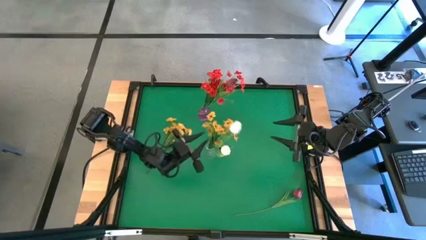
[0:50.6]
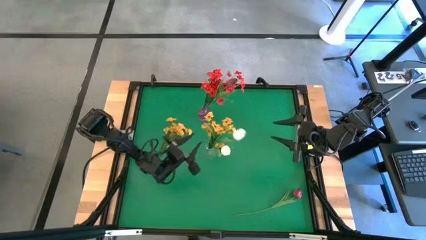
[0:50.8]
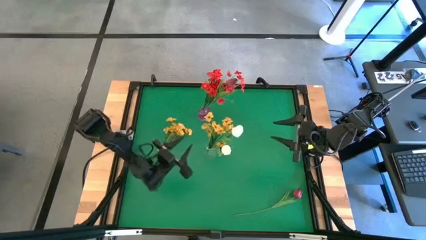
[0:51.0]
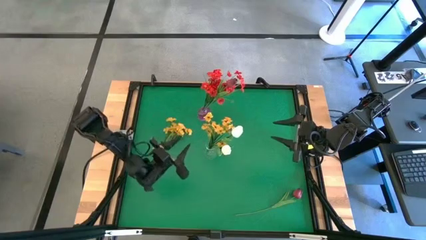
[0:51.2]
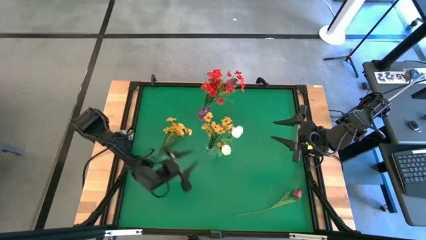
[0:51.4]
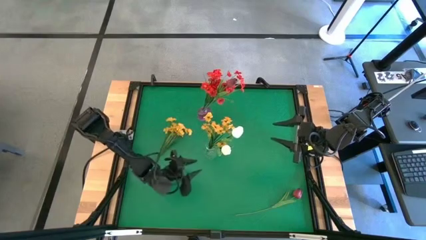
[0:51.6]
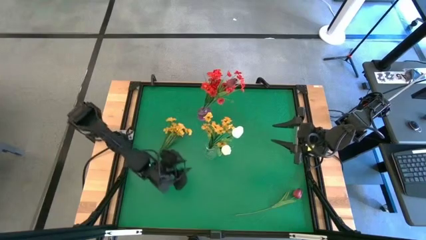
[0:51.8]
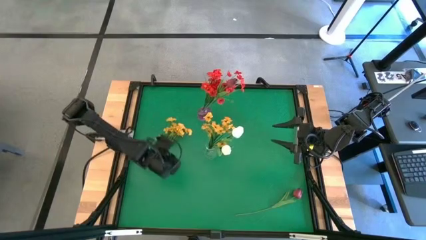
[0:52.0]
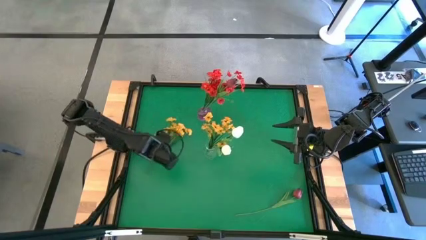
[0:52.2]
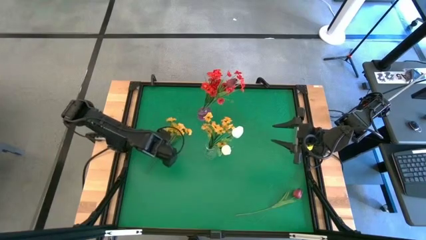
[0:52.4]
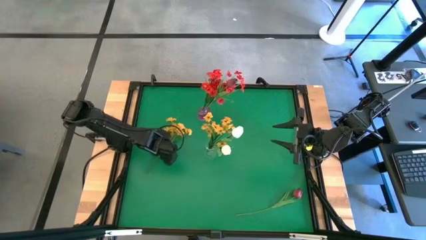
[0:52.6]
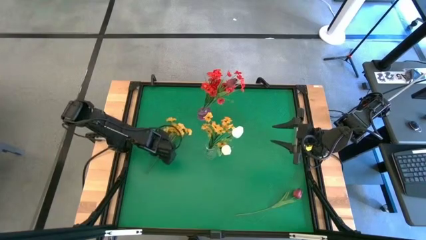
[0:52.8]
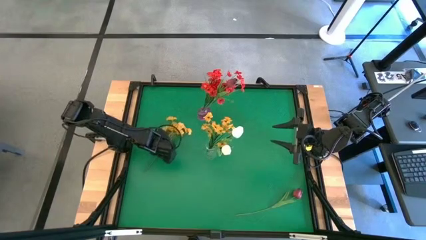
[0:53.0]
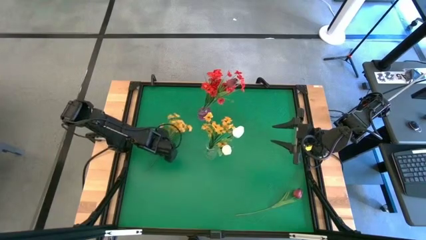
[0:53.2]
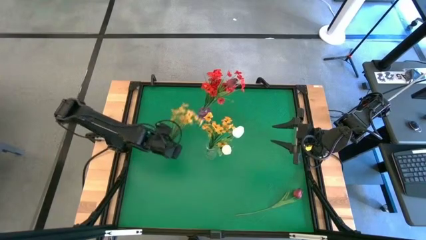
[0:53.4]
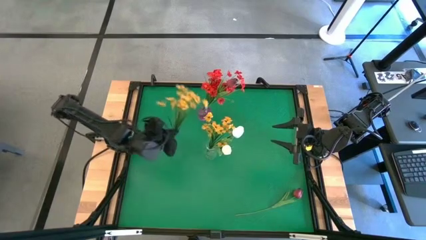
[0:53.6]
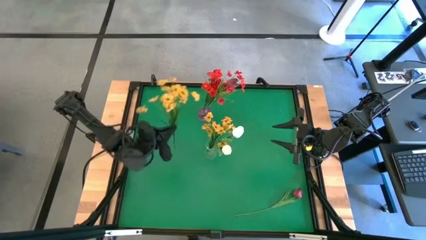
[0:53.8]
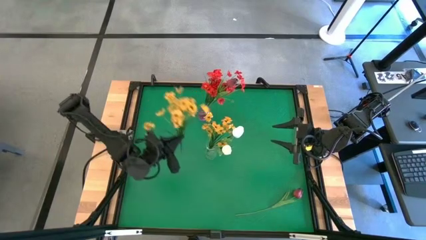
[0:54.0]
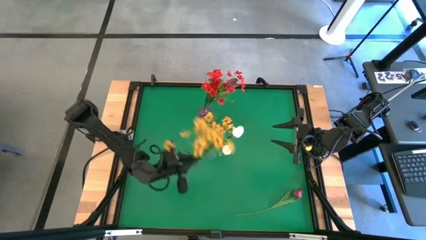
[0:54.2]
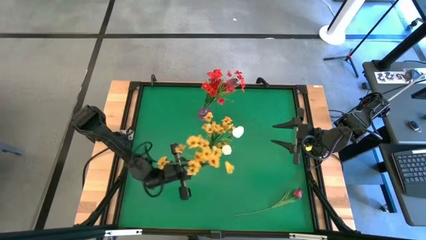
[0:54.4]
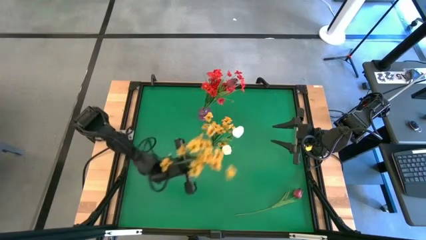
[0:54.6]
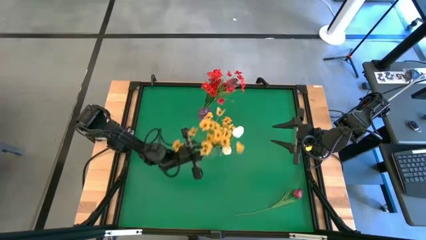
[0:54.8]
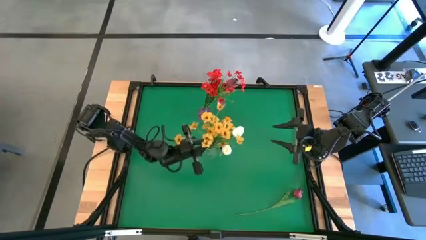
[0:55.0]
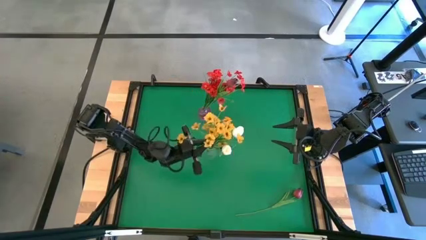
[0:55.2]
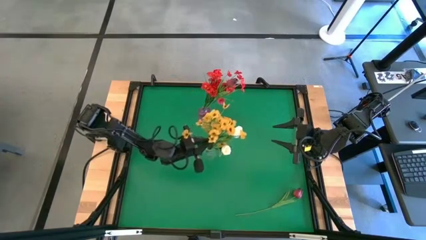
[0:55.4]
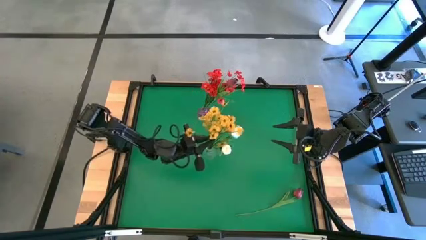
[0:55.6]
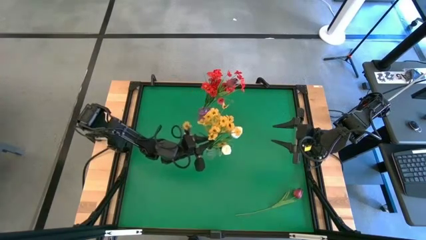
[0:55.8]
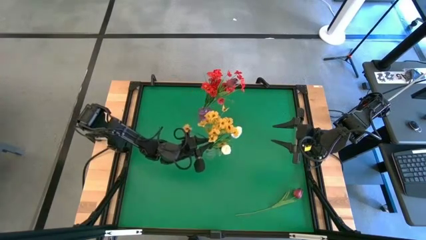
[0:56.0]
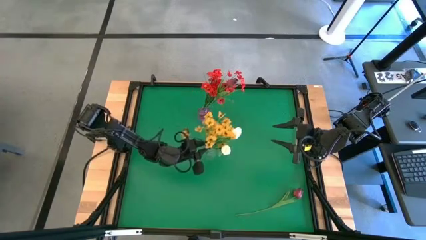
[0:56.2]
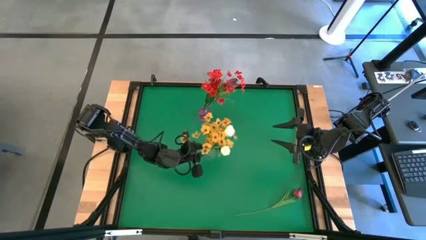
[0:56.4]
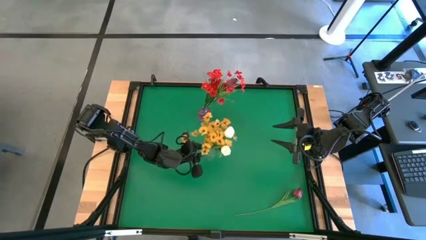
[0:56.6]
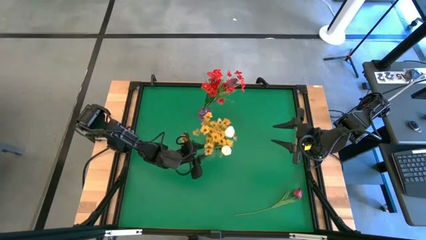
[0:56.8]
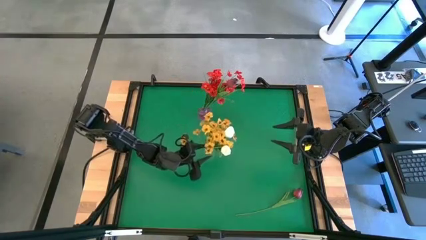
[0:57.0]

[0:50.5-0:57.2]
Task: Sort flowers into vase by color
Put the yellow flowers into the transparent vase

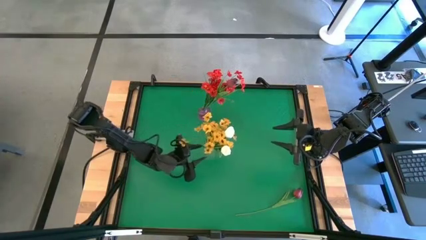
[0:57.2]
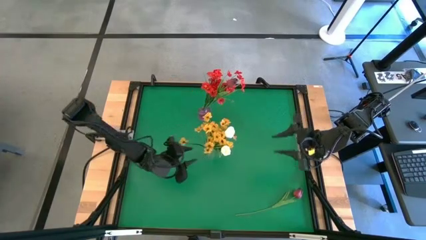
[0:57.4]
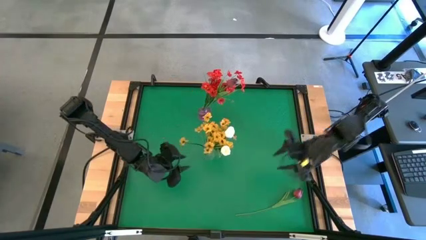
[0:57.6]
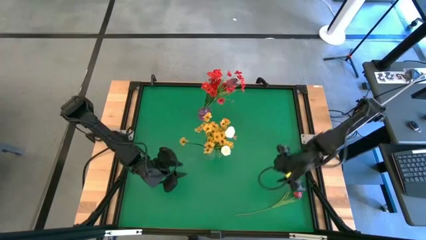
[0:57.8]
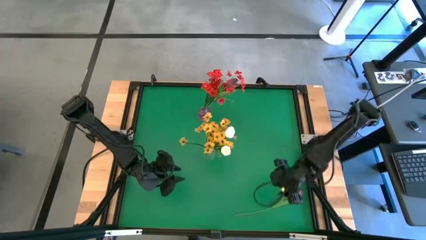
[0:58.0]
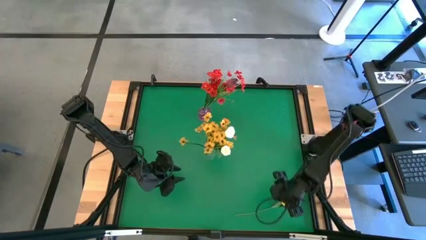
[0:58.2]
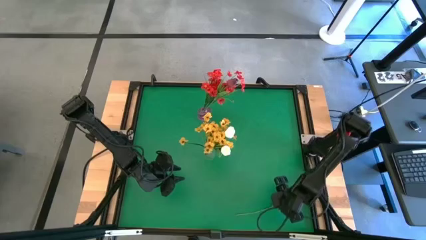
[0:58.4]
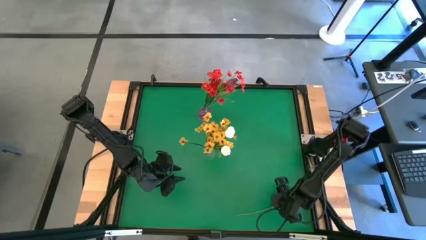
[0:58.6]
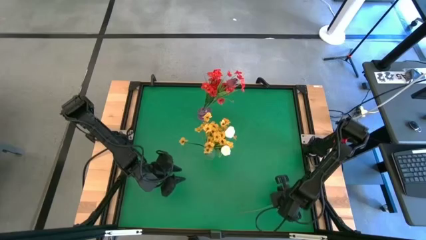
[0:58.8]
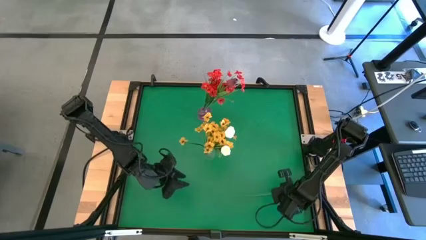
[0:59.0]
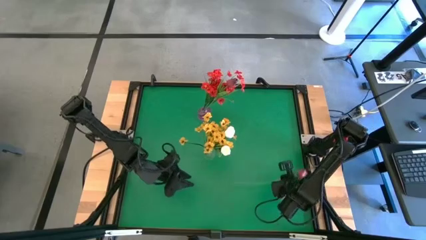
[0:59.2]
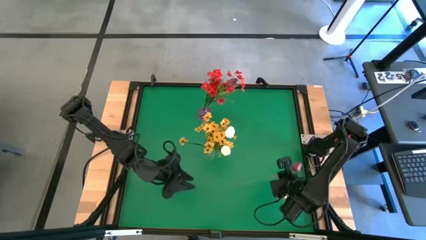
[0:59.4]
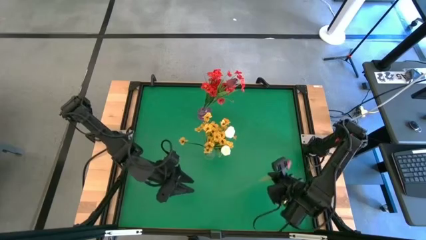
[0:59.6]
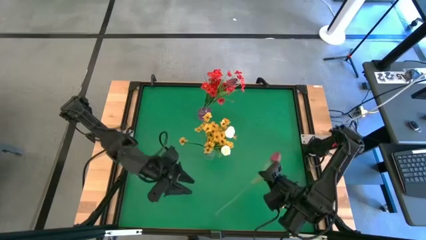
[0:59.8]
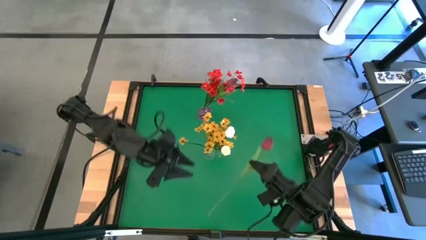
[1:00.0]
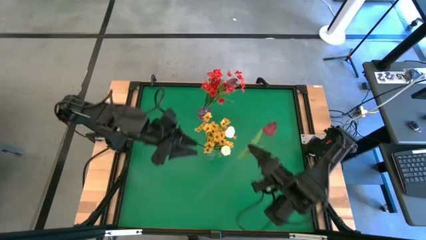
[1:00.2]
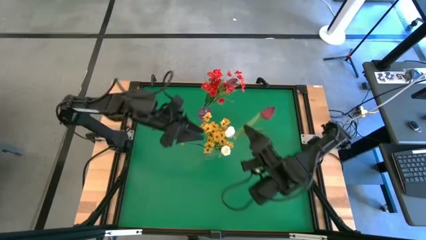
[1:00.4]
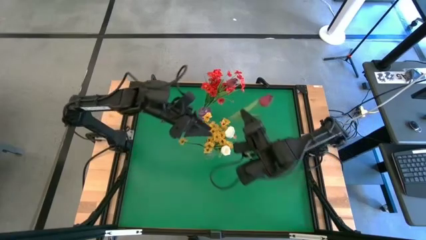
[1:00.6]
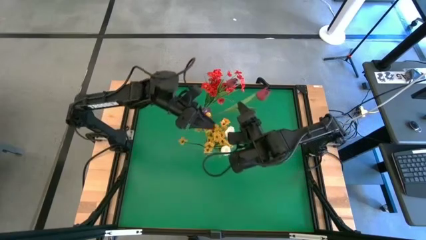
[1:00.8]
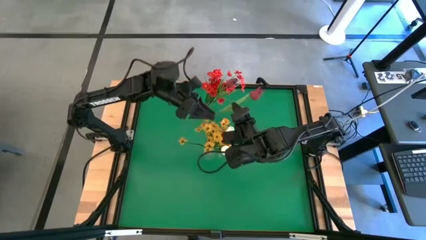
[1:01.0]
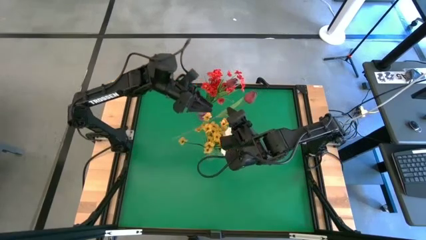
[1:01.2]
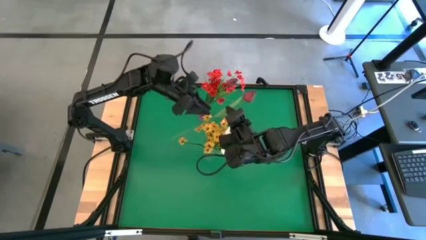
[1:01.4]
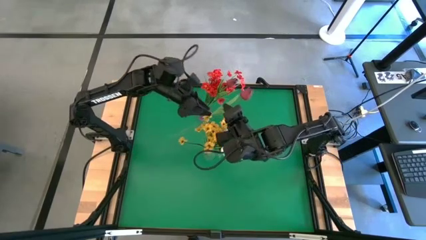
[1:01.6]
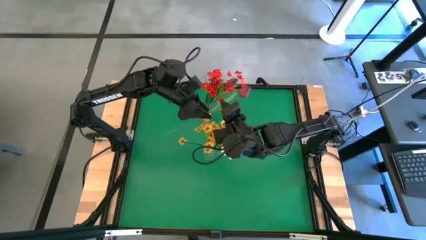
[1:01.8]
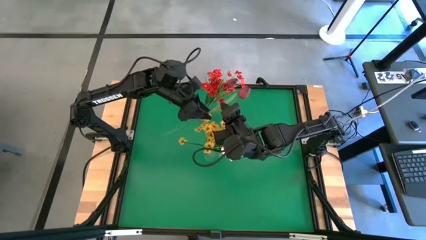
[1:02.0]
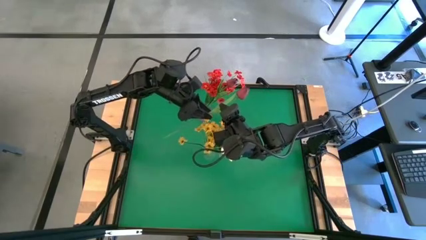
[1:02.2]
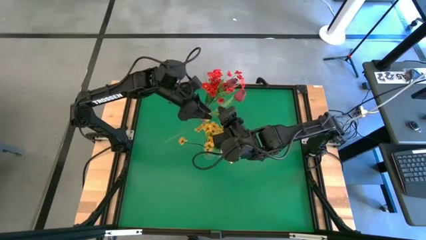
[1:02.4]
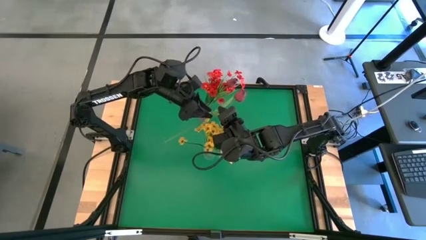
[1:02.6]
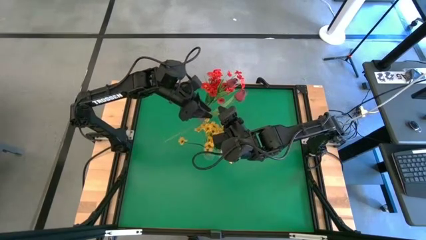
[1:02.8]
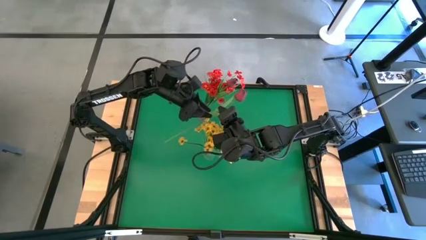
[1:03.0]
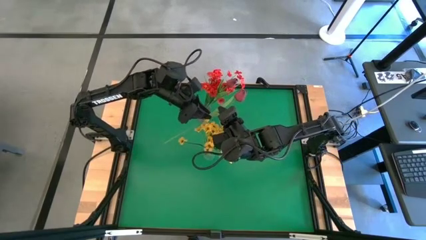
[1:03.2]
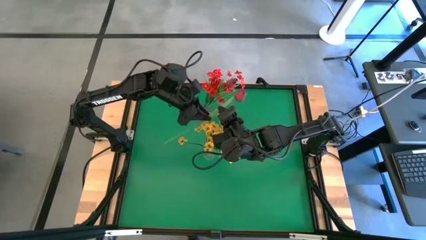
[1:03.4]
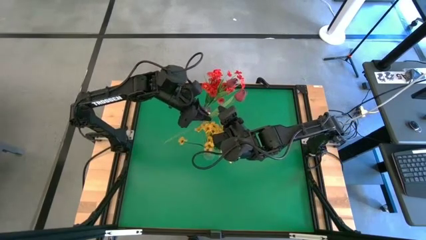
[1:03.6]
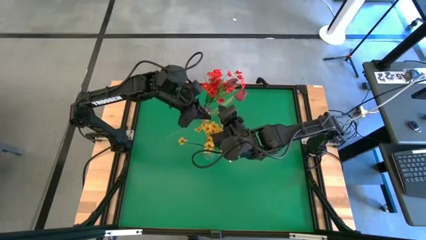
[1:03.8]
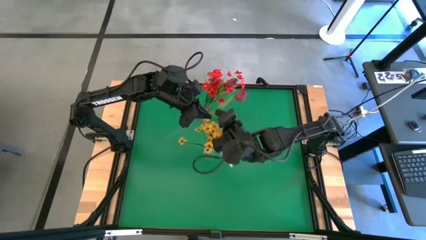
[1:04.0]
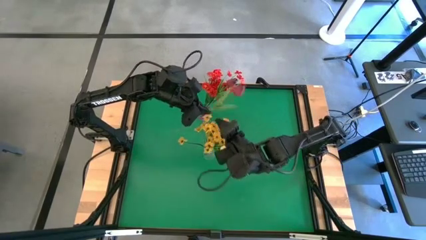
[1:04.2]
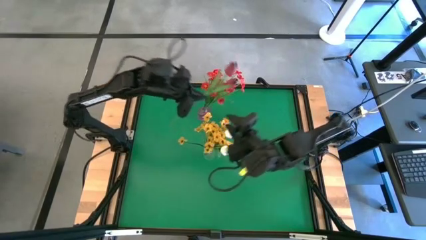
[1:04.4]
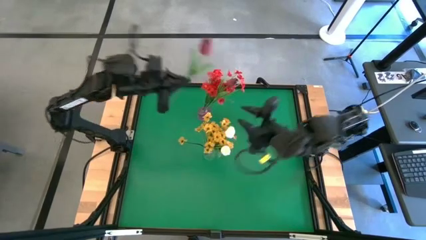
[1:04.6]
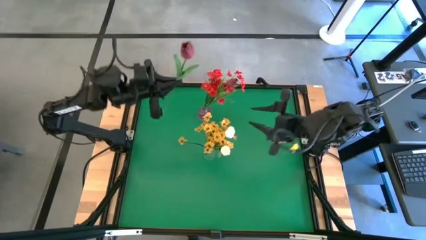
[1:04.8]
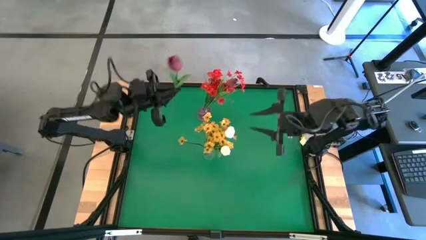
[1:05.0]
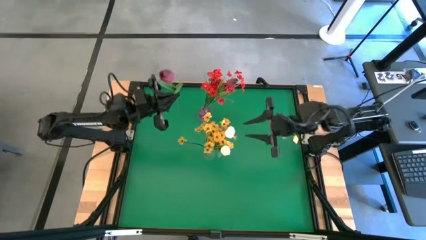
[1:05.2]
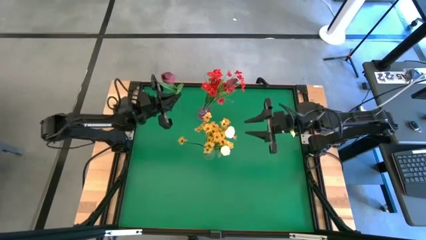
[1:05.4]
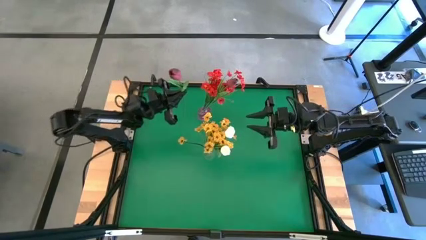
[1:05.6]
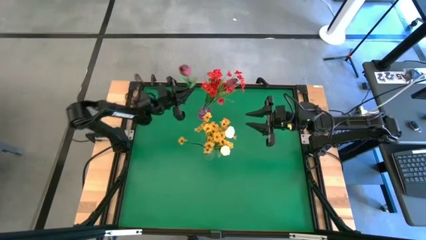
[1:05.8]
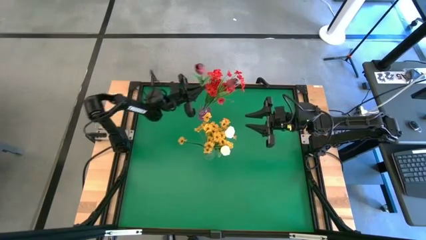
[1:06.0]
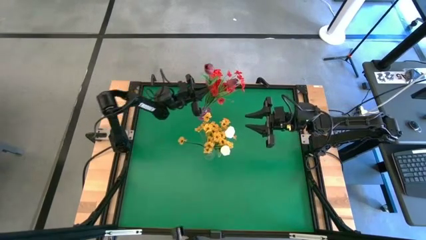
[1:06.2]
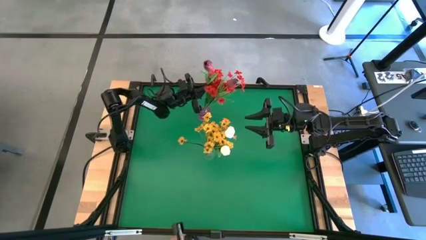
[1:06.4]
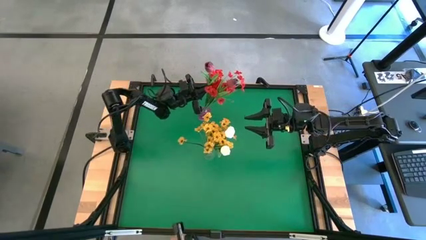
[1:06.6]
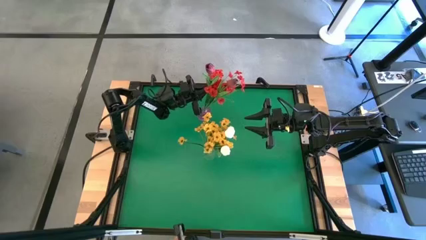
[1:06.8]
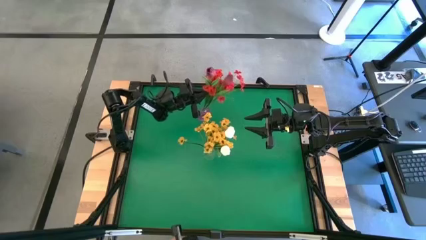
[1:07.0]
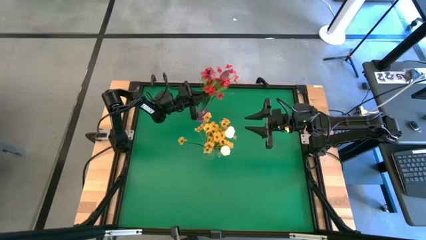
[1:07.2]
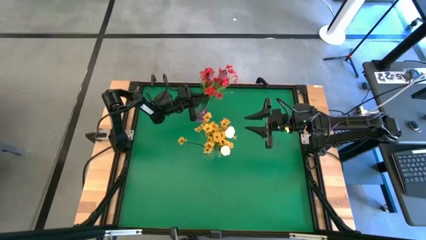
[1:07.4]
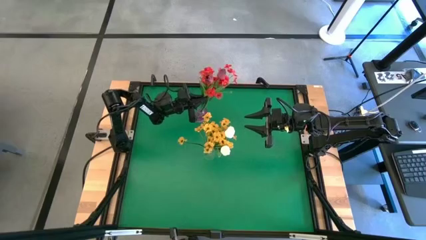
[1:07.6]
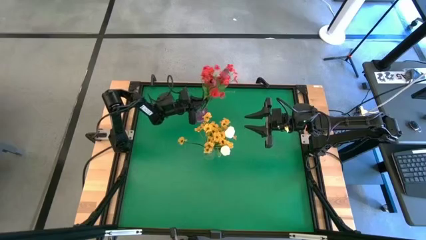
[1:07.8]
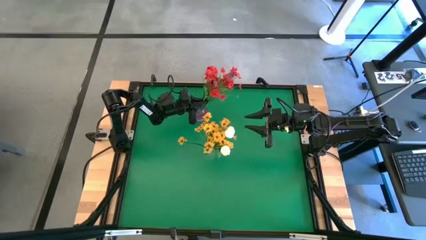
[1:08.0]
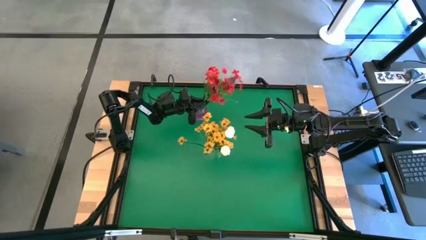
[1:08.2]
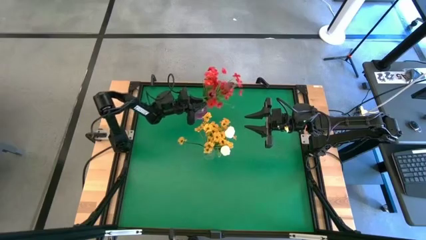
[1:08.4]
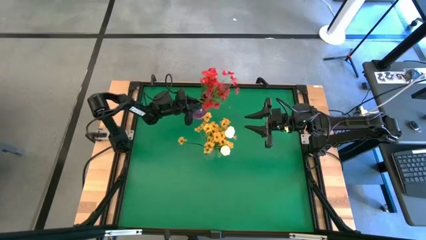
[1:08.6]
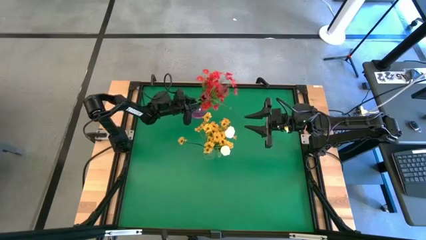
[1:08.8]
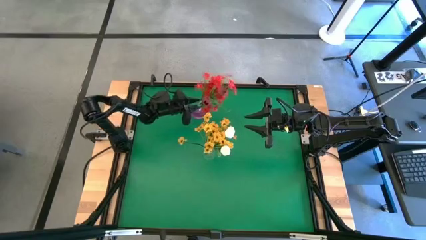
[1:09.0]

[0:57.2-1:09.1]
Put the red flower into the violet vase
